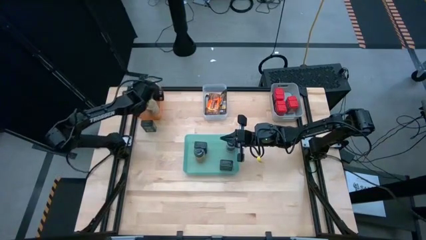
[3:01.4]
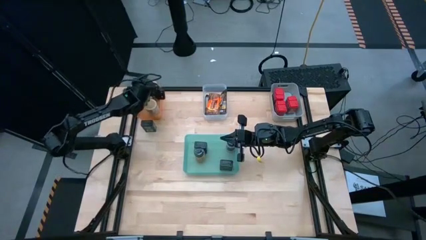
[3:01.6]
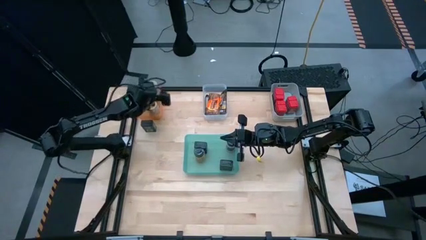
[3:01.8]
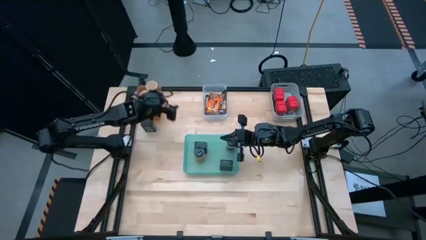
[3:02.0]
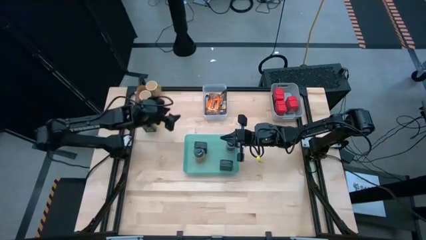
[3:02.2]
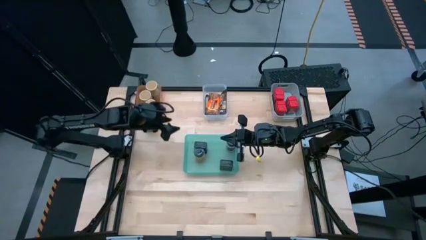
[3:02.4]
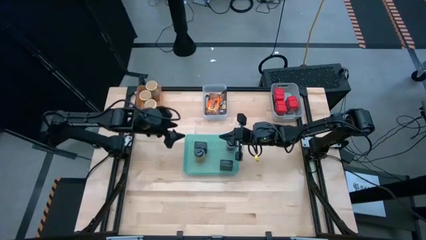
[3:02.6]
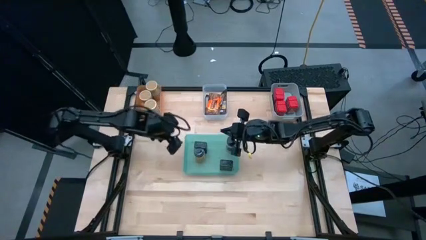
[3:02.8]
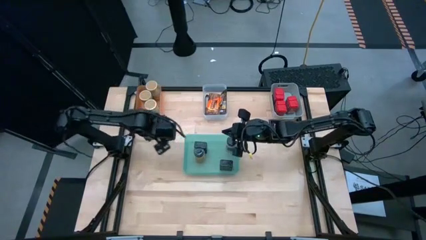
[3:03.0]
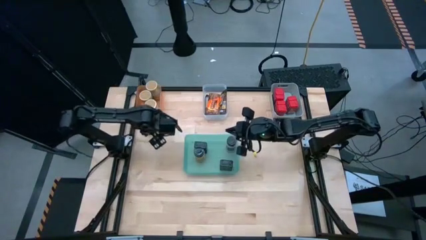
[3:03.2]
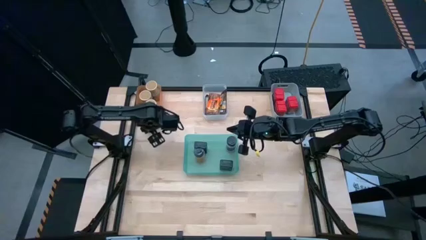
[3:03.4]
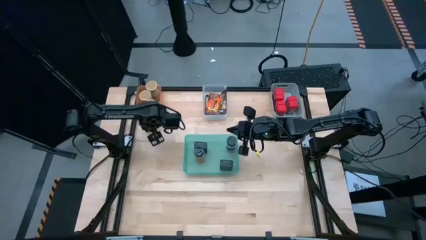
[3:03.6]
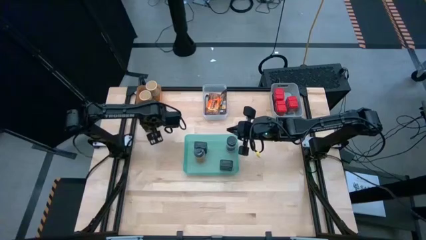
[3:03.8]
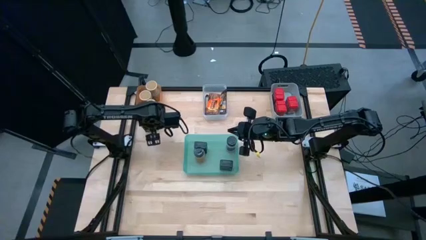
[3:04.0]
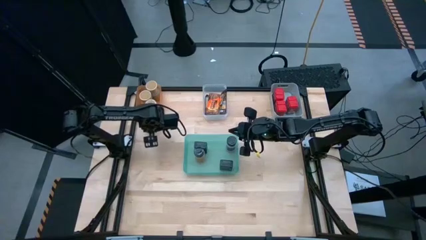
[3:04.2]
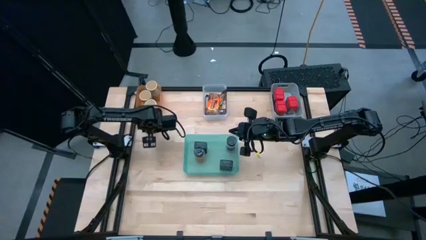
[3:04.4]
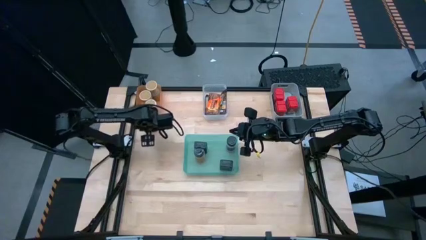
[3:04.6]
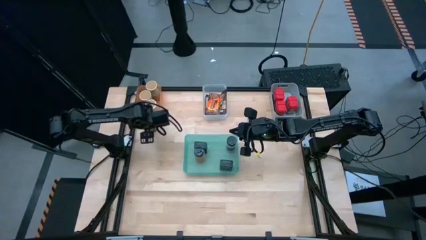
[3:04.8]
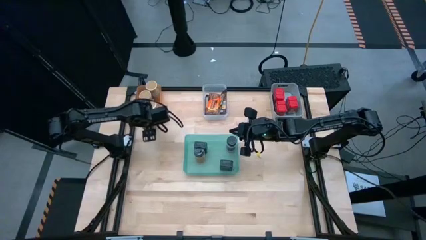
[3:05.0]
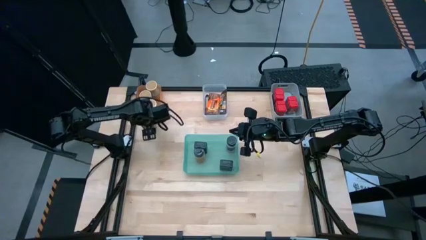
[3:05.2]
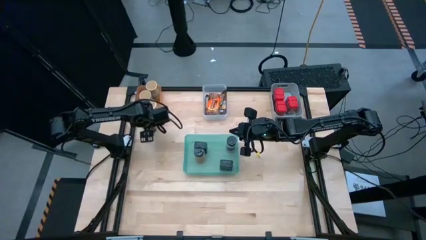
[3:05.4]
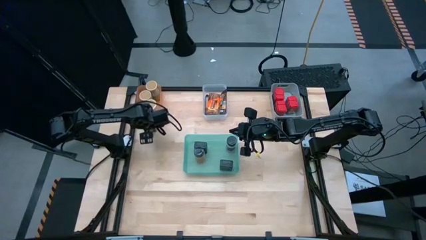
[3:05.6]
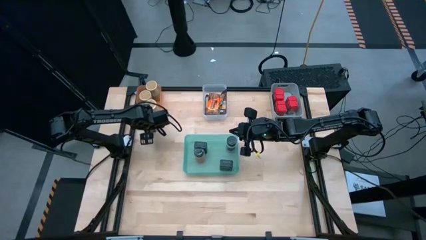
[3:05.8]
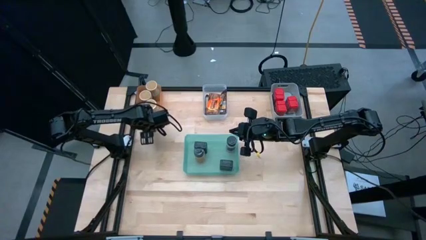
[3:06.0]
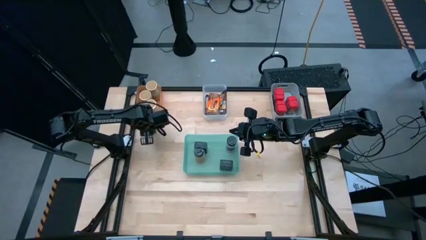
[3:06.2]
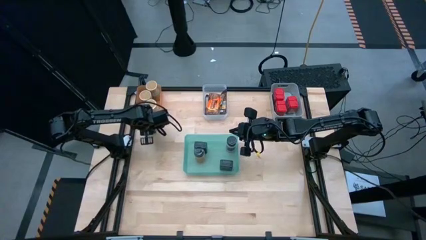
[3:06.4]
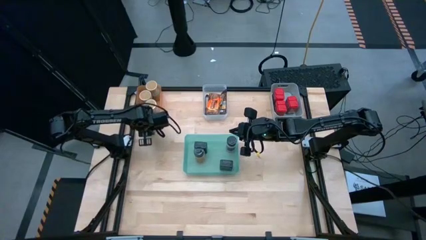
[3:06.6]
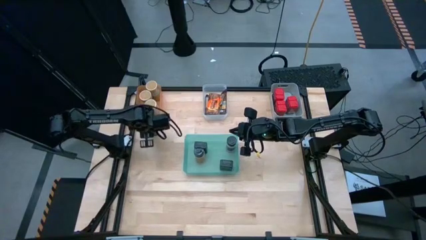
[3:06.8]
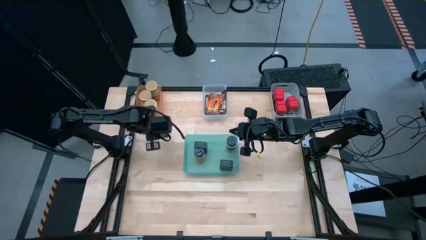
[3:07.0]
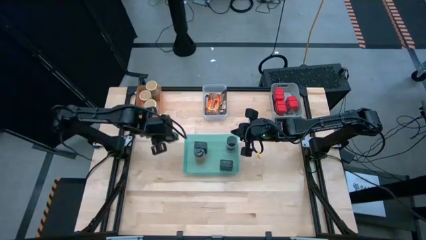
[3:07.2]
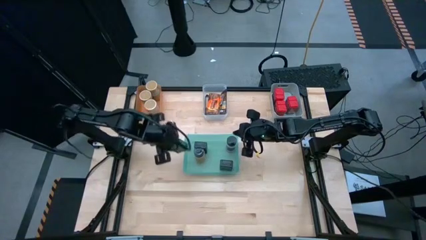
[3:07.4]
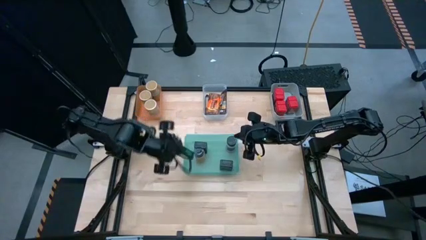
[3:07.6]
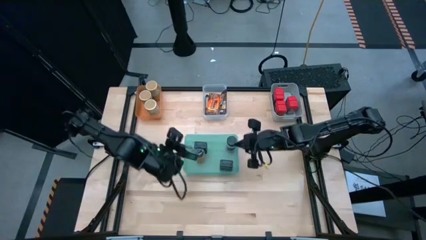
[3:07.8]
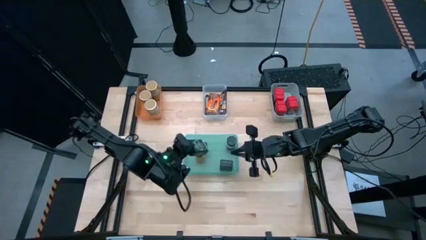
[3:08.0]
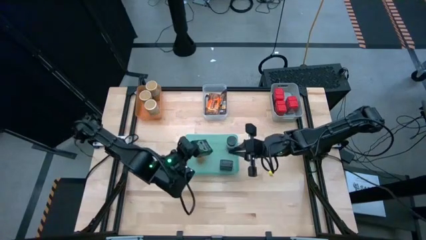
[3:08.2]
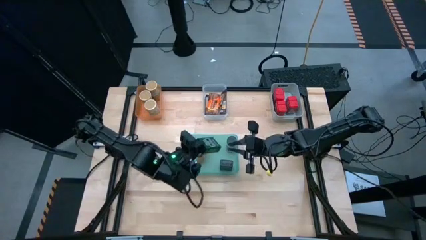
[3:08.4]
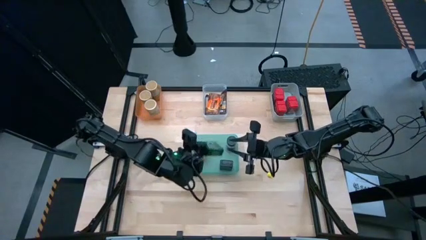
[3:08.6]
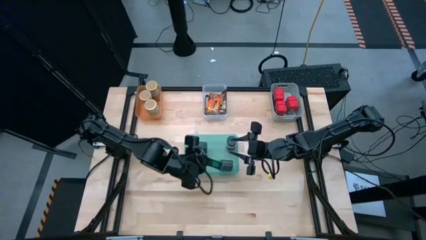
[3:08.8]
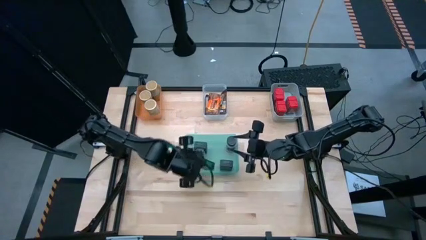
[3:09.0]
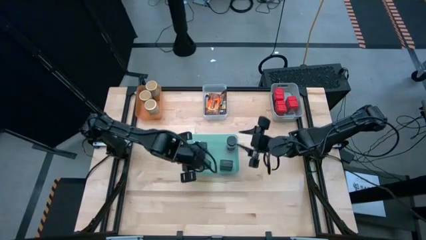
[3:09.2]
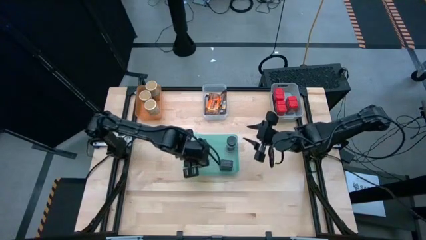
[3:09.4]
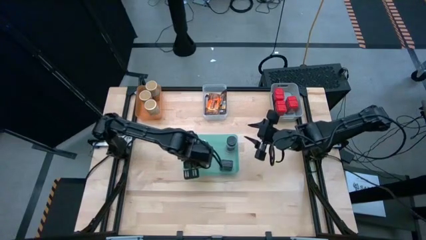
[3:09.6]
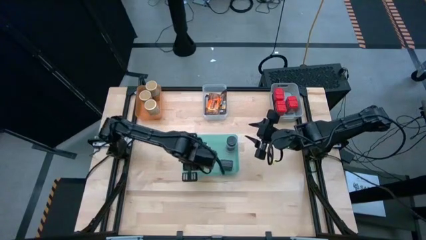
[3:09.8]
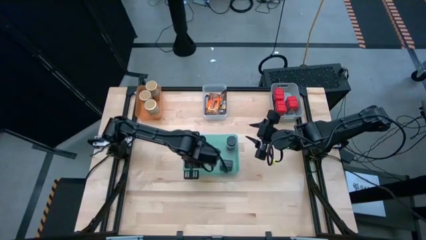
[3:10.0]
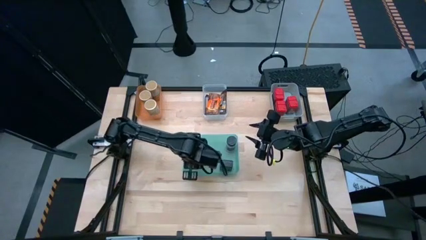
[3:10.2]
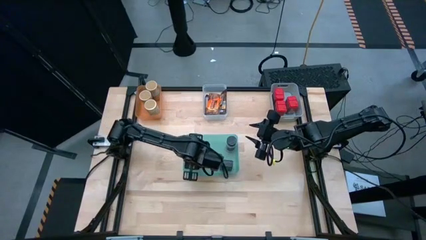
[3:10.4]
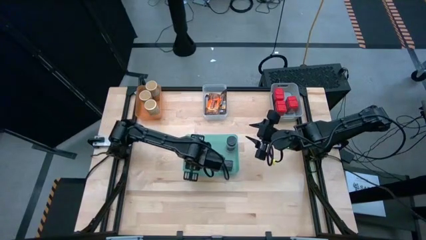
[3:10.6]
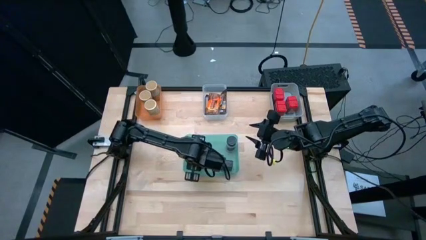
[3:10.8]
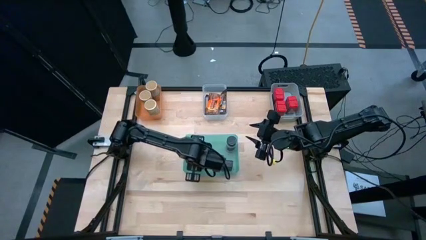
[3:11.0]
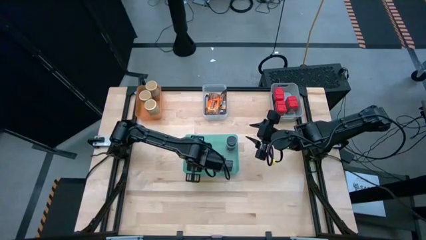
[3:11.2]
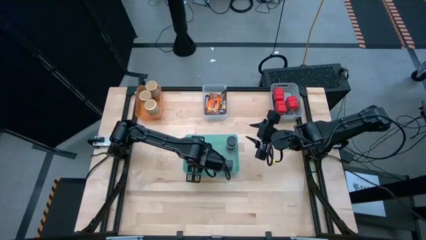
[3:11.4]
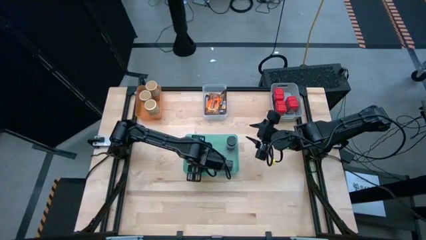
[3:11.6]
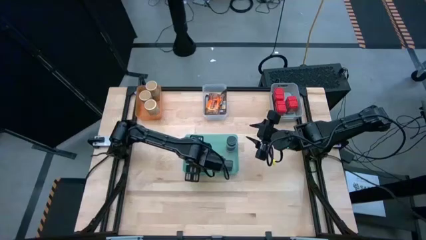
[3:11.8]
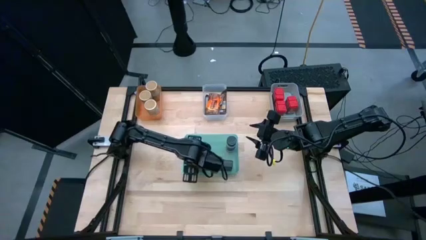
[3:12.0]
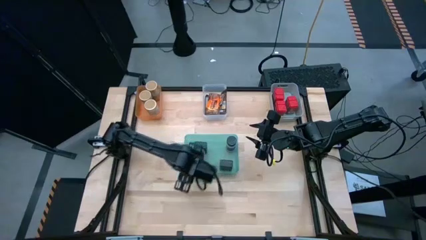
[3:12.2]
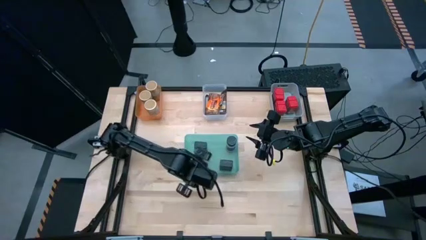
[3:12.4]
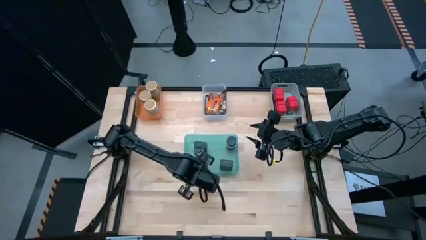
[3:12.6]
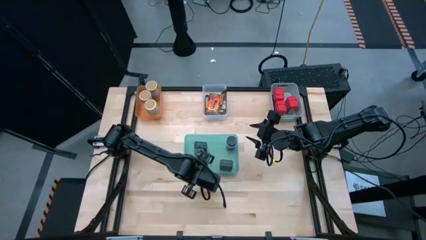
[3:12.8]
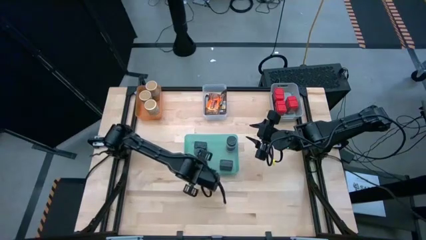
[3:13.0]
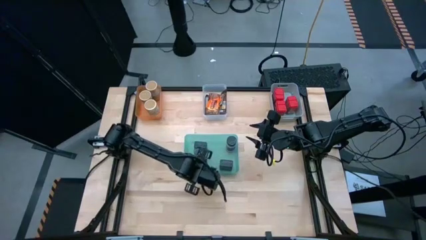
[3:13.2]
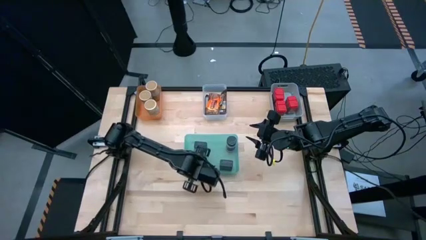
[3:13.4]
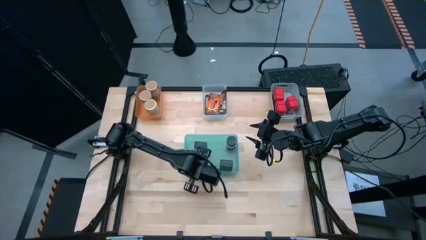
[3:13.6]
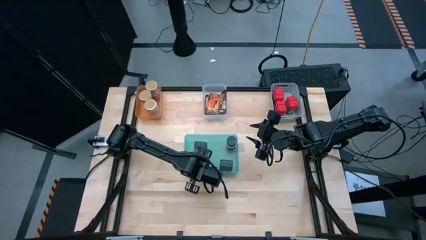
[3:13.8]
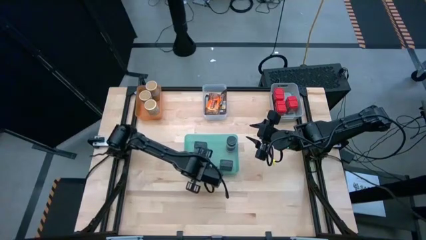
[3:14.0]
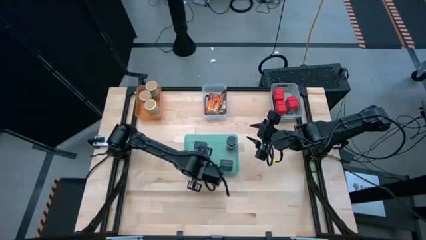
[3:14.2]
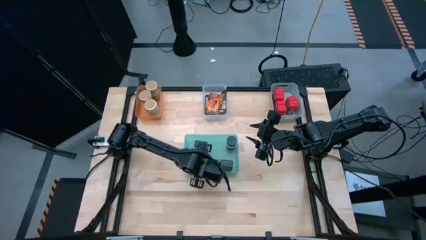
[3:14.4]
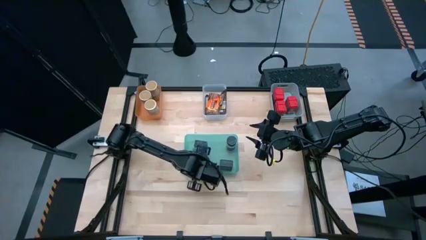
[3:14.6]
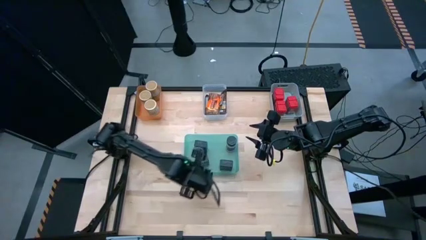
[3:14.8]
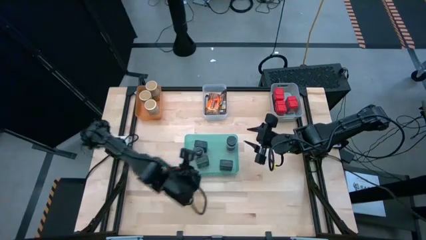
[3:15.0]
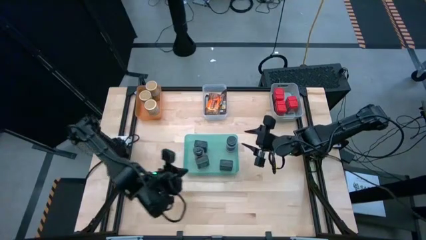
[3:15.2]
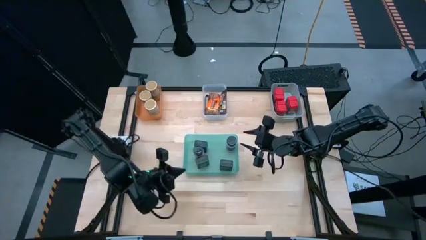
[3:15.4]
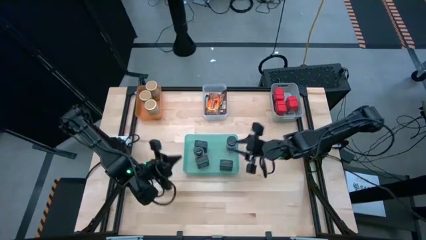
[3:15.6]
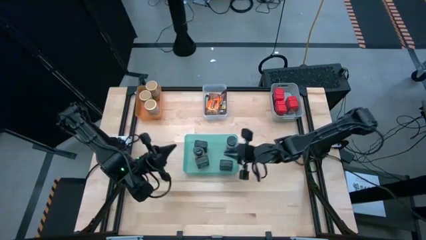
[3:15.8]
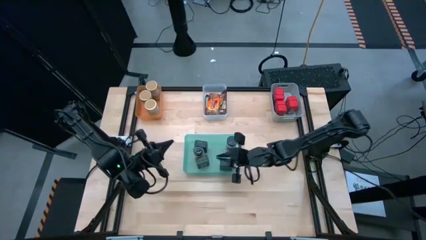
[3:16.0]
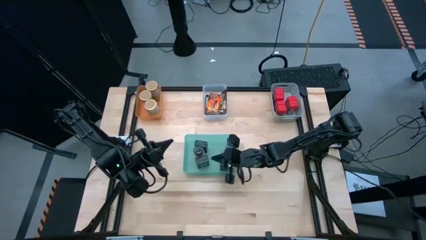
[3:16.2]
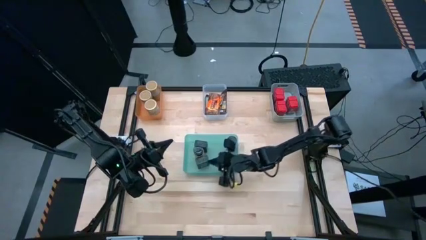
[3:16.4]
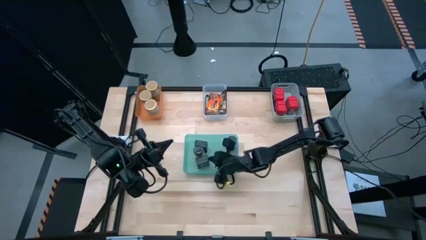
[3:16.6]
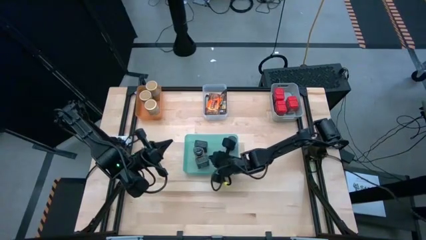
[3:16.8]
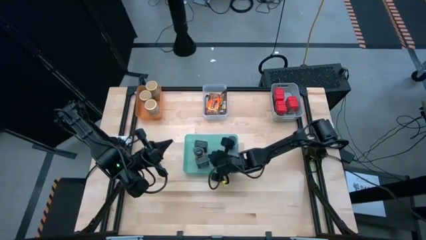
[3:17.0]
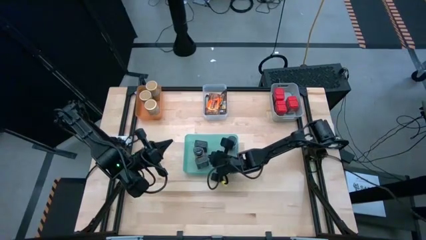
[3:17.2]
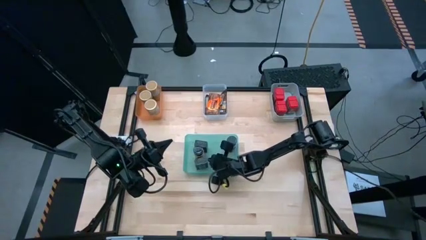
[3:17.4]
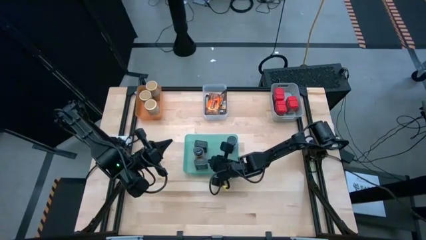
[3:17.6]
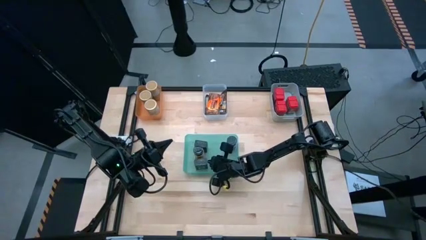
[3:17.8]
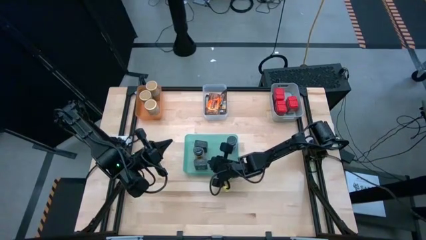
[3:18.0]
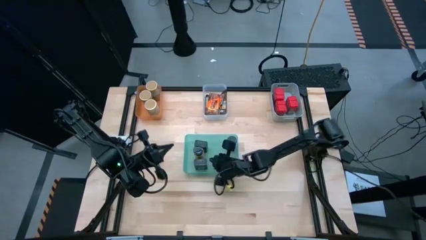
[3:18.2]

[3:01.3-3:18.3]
Task: Sort spices by type
Put the black spice can into the green bin

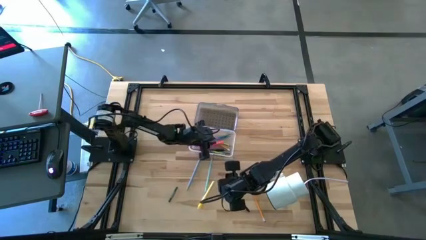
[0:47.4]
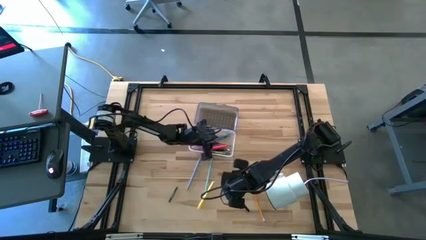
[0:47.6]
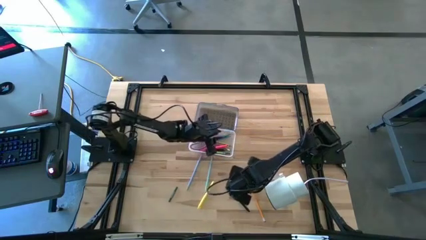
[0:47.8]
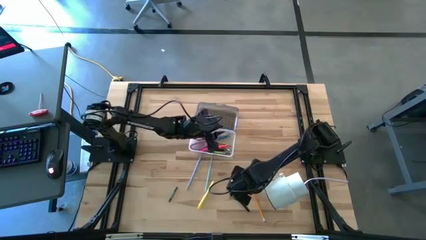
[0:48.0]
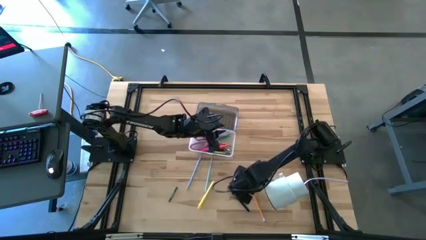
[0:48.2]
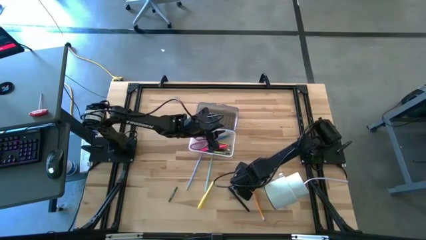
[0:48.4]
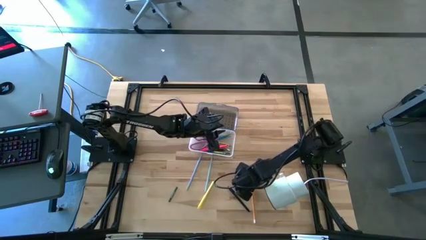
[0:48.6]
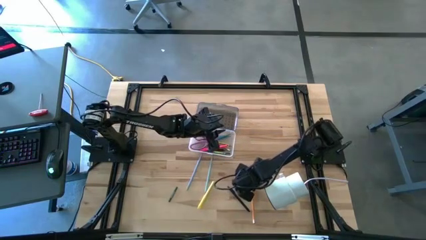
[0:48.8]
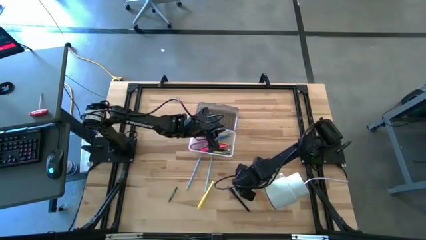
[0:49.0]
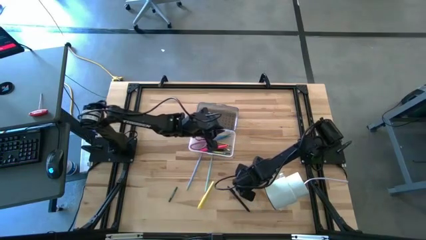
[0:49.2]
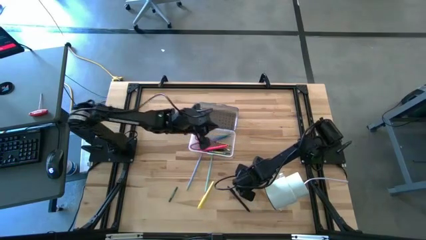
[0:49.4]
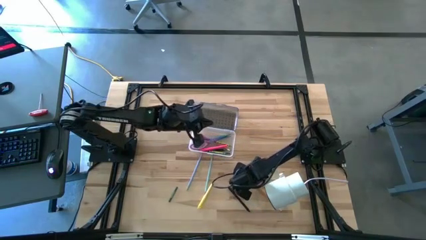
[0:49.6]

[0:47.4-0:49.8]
Task: Pick & place school supplies into a supply box
Put the orange pencil into the black supply box
